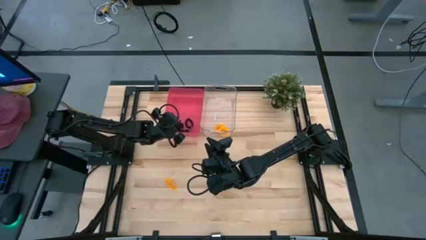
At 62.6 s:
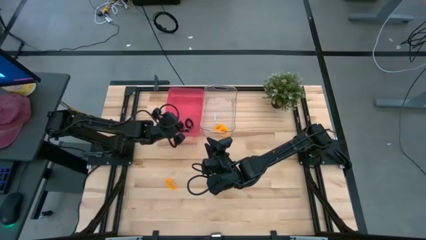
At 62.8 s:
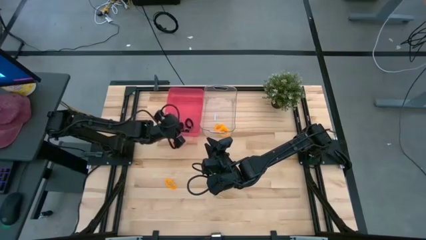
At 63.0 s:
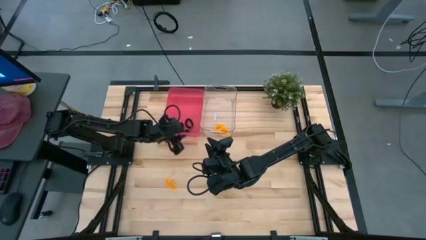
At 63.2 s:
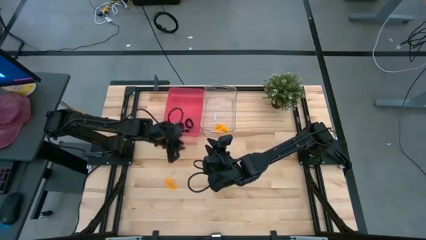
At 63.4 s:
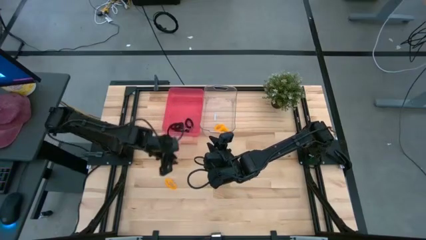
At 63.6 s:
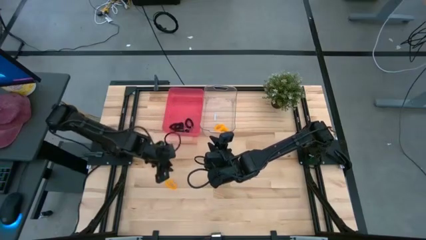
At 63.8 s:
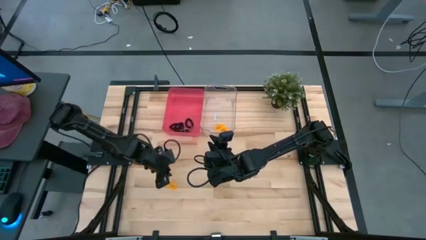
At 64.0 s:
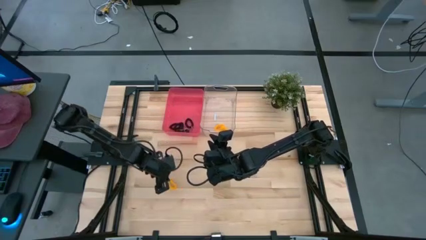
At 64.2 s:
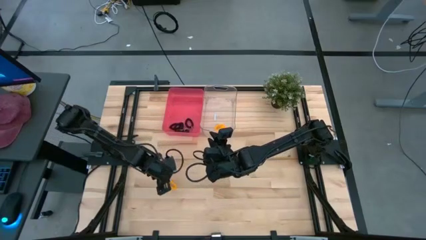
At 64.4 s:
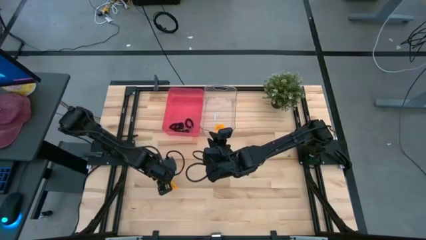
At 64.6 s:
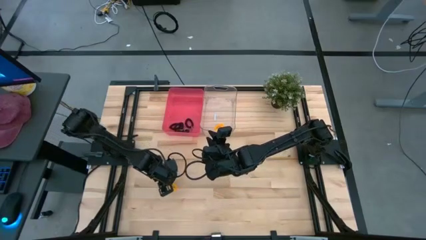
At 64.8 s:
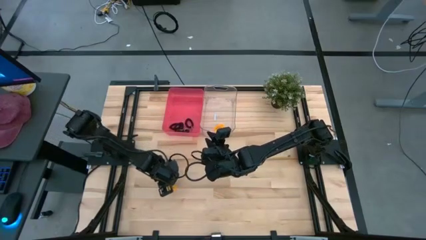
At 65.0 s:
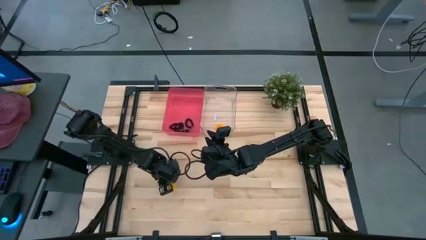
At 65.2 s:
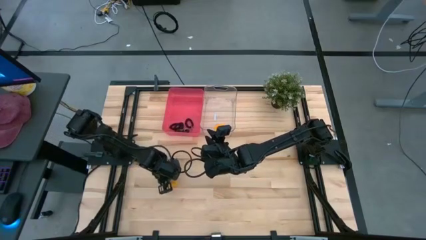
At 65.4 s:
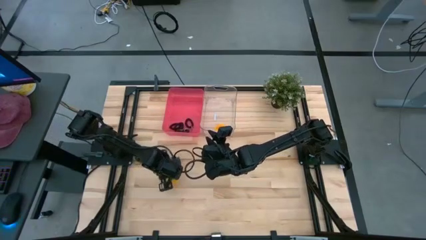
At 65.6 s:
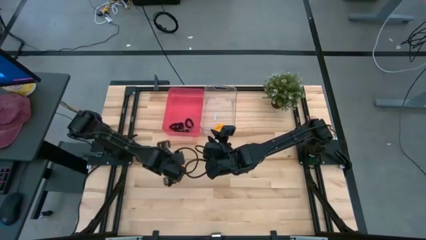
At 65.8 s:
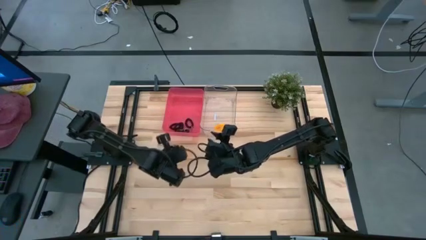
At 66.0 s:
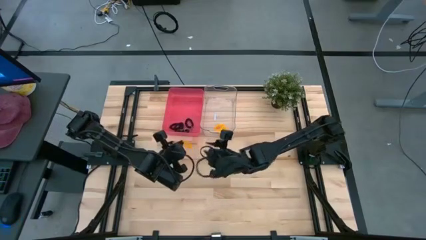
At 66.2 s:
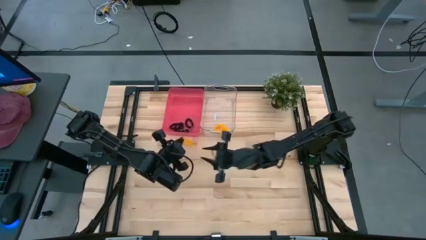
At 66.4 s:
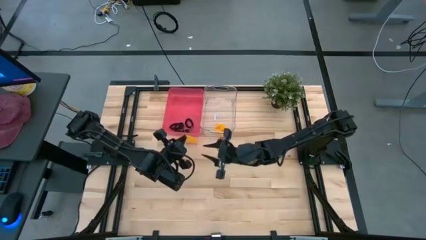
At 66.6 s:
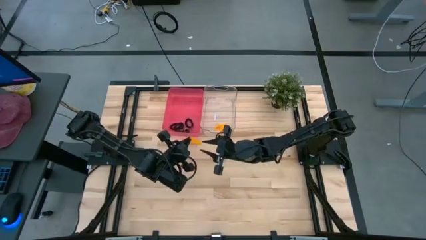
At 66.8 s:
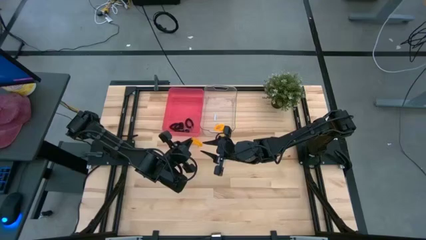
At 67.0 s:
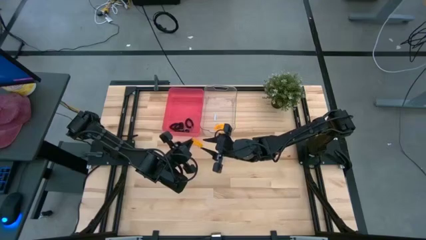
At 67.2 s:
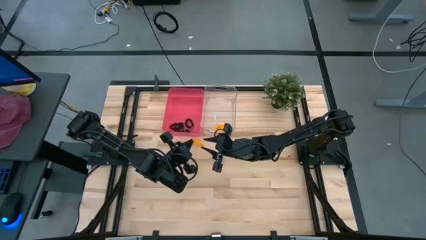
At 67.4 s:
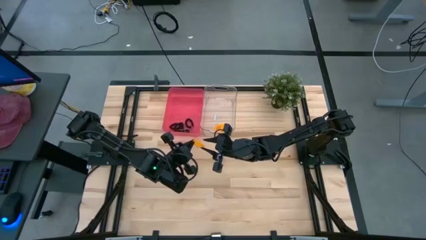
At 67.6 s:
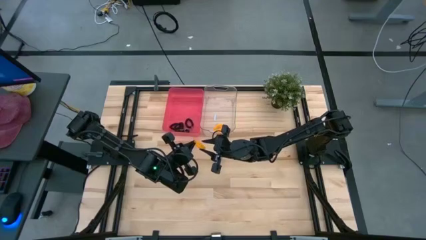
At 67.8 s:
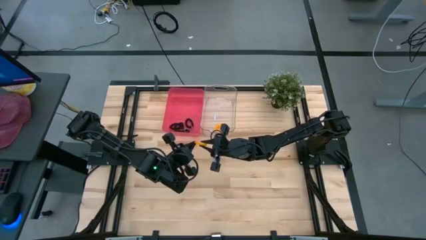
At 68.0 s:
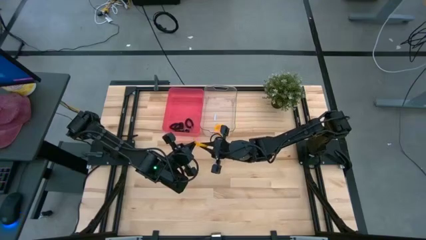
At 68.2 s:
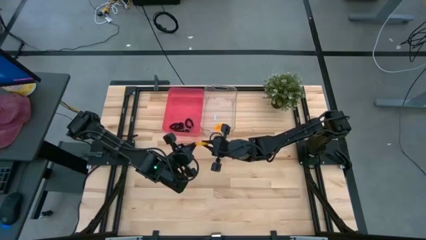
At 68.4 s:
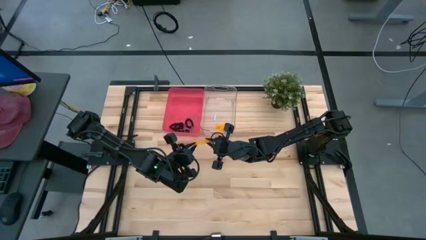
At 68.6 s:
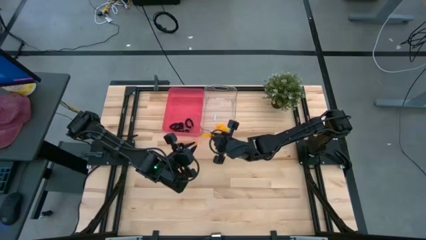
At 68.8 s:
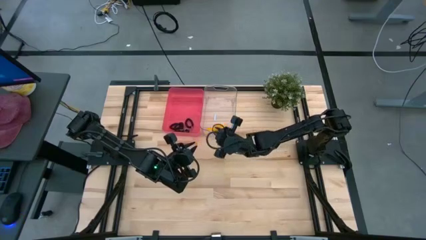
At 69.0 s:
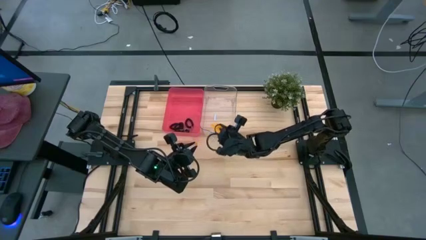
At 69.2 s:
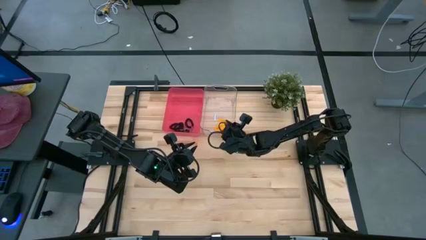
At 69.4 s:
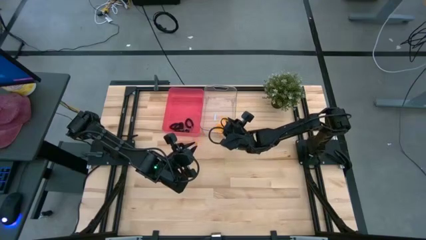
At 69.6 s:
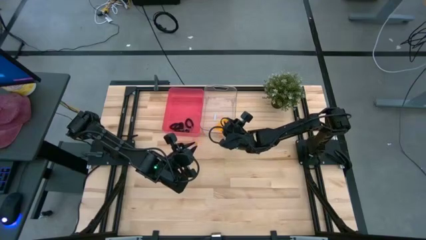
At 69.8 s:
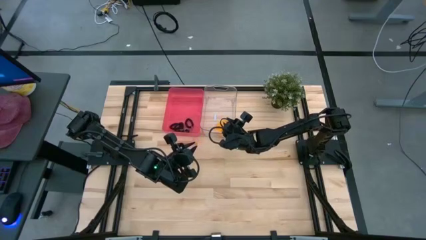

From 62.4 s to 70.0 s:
Task: Sort spring keychains
Put the orange spring keychain into the transparent bin

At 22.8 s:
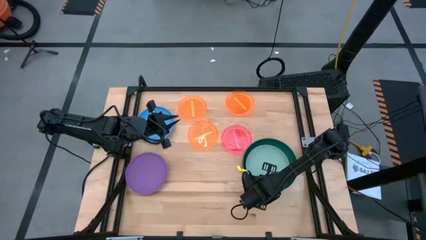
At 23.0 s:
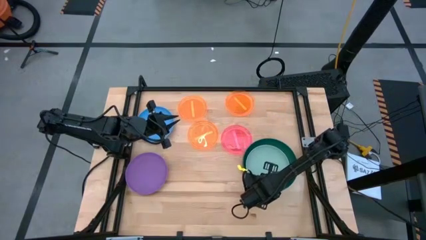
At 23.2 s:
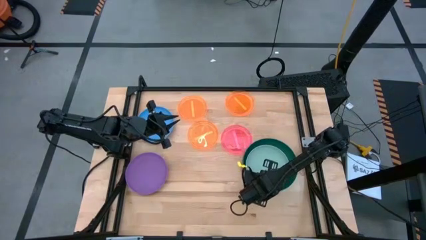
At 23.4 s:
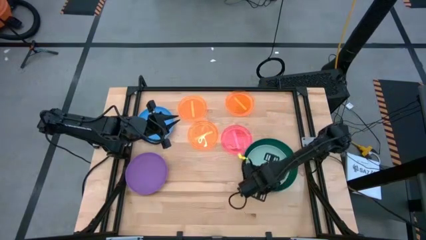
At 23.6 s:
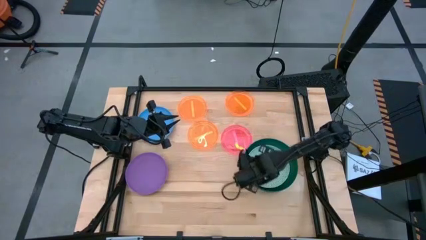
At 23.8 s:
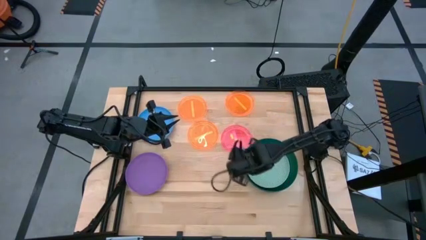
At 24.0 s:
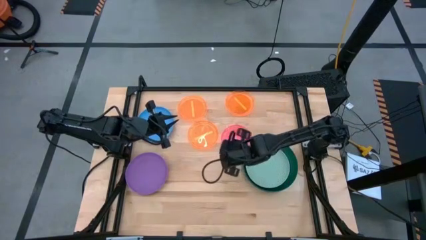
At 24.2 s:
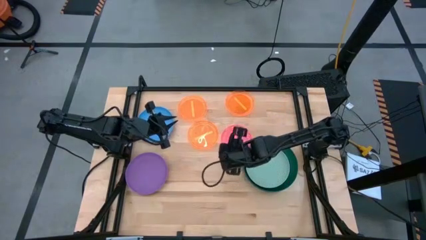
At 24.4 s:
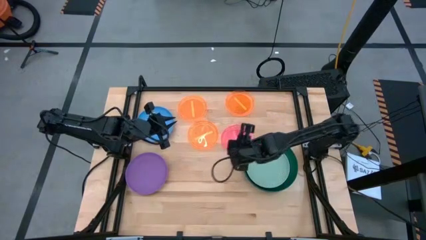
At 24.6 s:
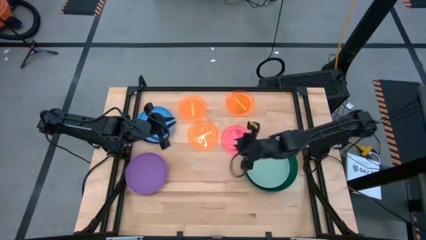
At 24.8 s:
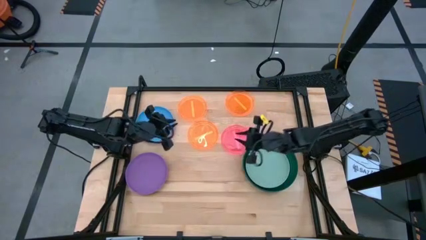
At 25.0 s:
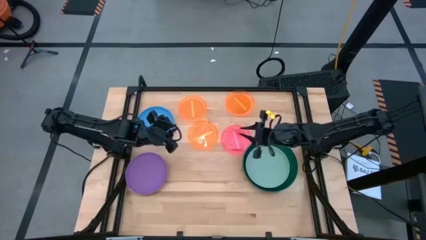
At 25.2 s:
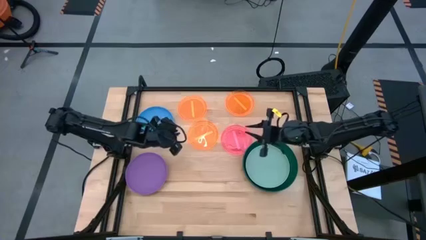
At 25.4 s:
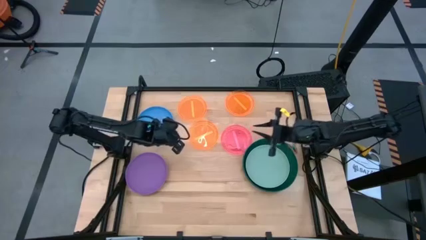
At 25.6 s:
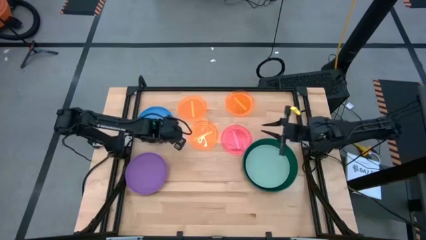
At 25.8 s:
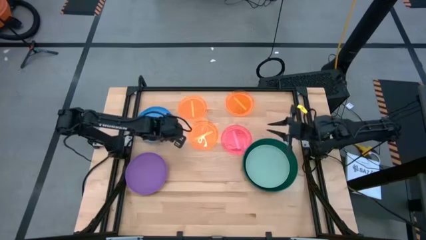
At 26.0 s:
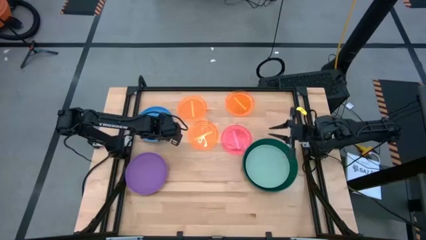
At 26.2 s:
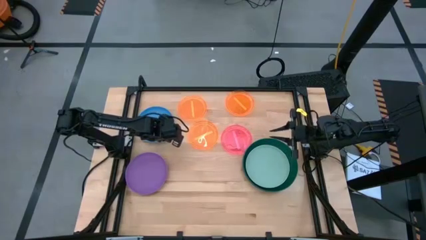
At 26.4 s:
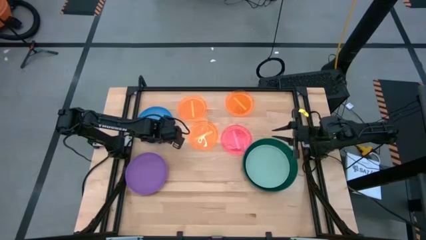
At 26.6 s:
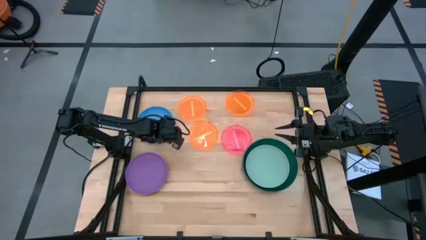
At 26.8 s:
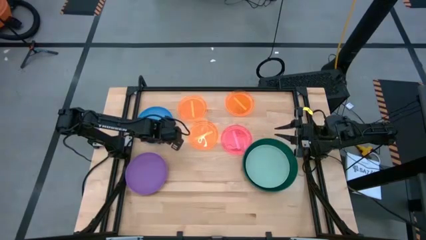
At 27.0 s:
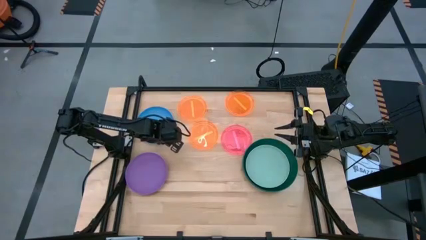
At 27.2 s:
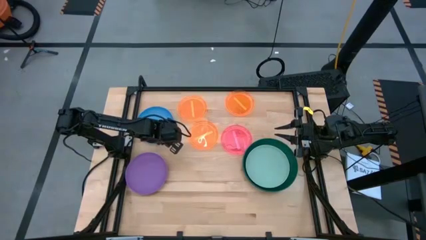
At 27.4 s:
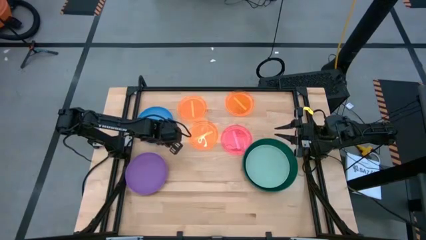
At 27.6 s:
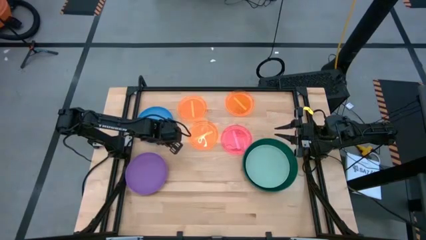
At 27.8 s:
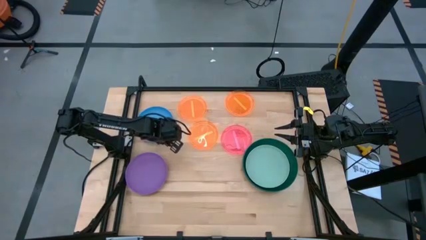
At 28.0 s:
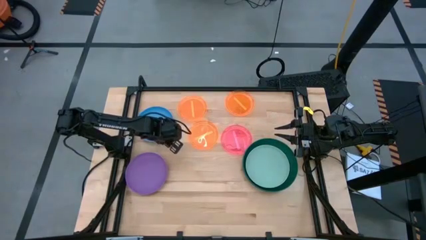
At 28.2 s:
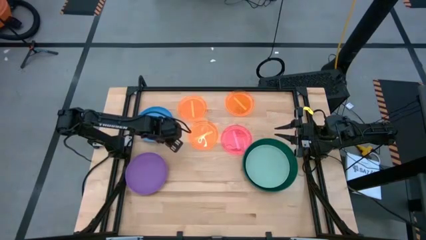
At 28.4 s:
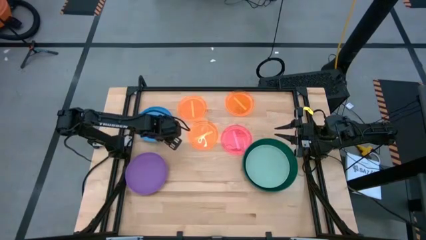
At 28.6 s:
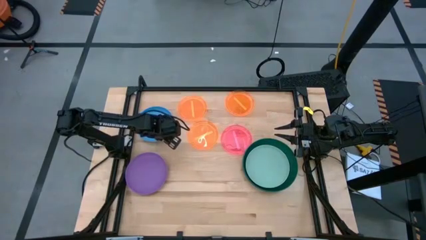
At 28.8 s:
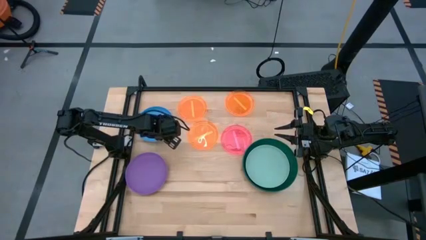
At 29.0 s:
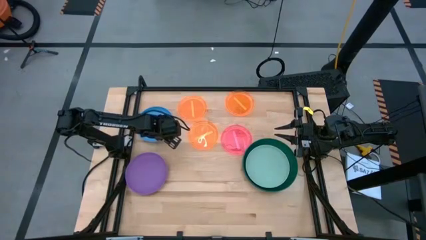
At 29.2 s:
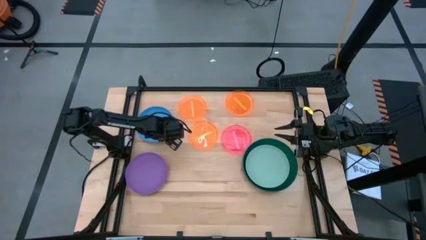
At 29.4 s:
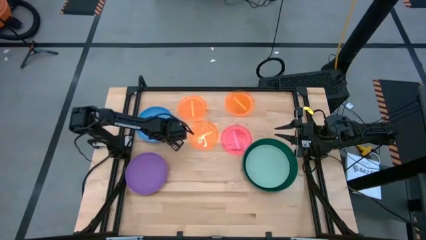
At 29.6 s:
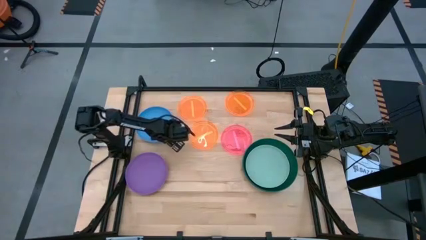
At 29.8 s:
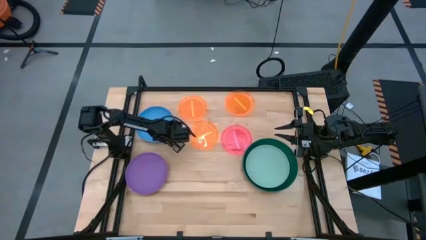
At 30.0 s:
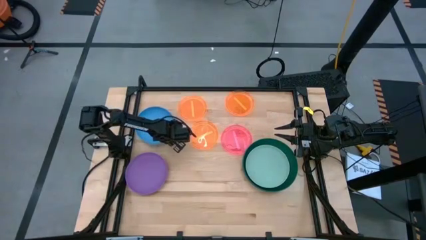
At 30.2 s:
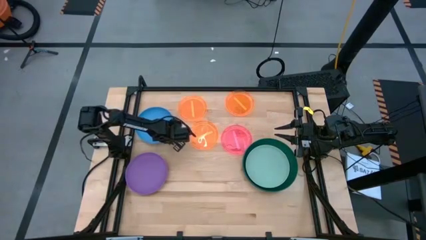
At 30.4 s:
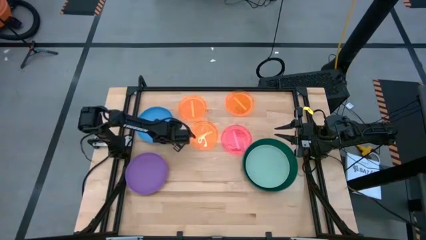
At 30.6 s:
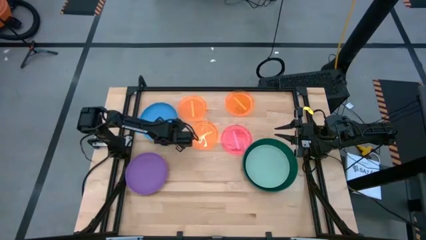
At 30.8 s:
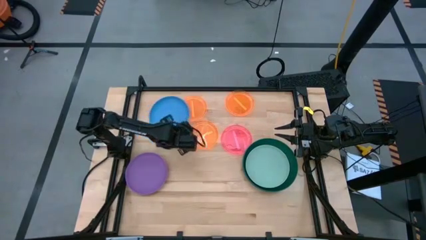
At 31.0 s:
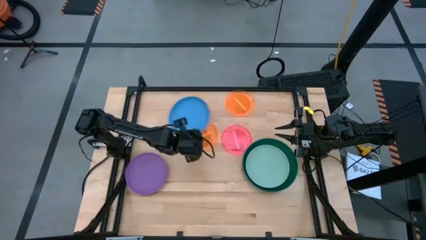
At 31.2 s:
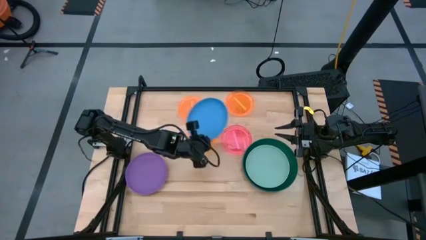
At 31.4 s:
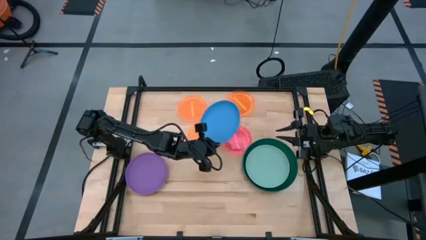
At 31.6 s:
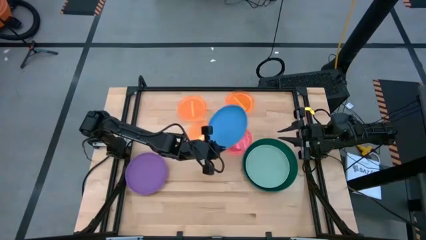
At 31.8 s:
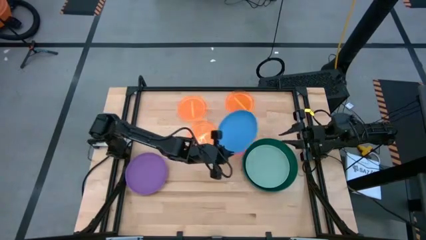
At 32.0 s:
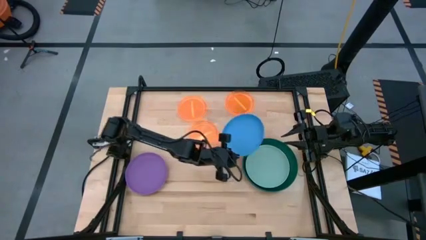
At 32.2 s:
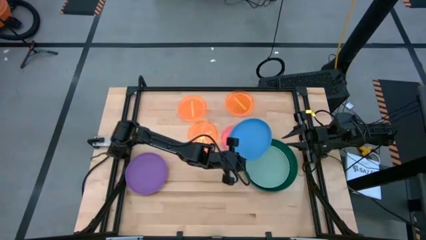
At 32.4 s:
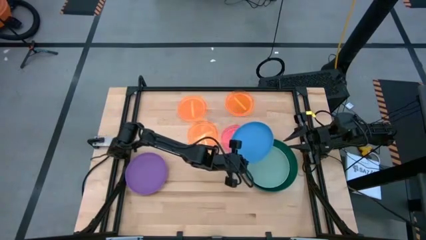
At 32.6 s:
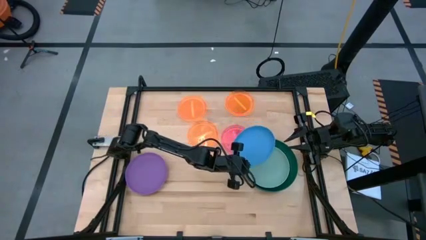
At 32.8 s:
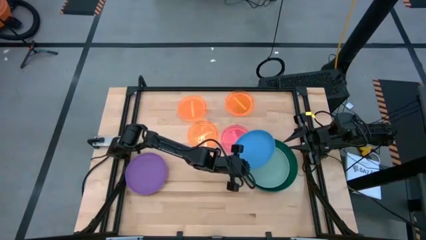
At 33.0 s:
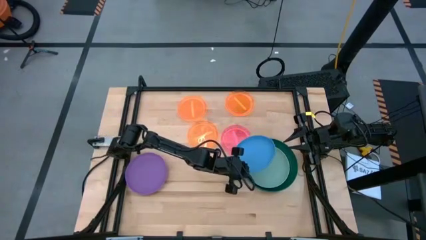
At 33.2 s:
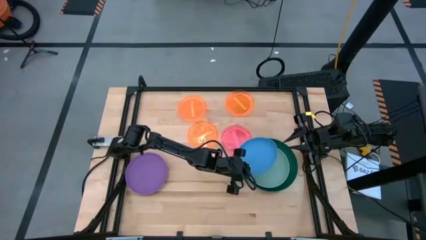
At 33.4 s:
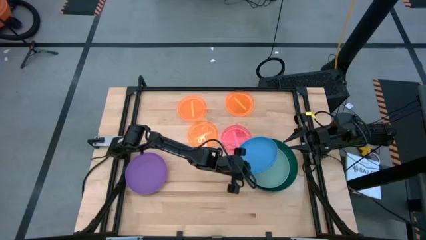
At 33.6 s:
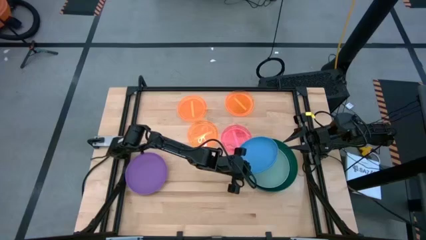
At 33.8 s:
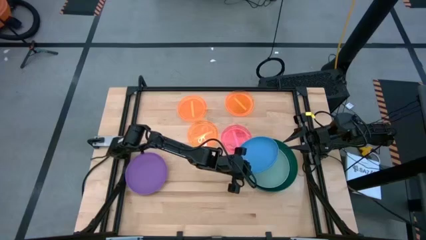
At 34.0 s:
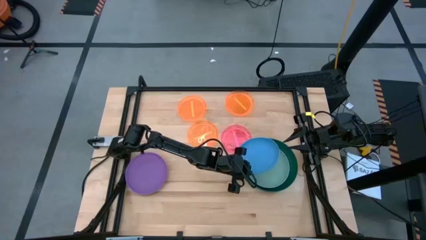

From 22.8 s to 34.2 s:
Task: Stack plastic plates
Stack the medium blue plate on top of the medium light green plate
